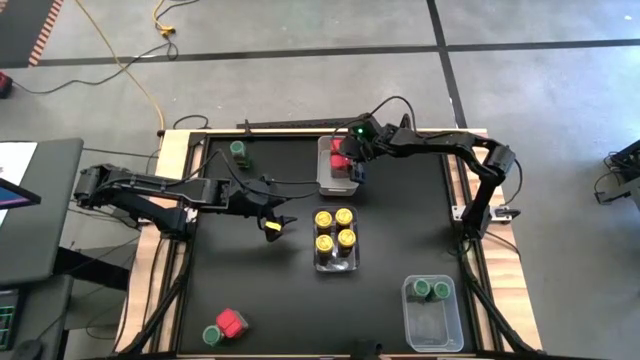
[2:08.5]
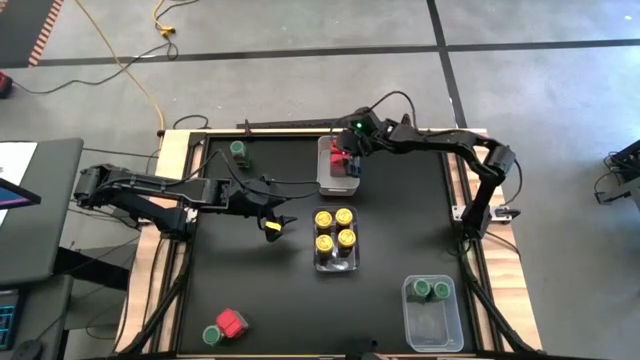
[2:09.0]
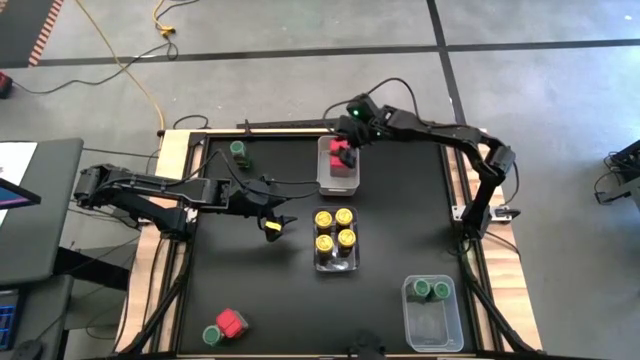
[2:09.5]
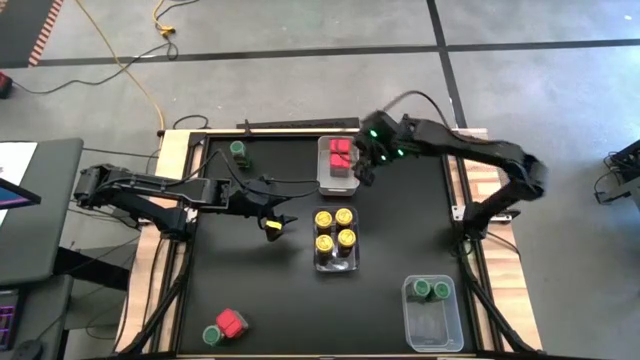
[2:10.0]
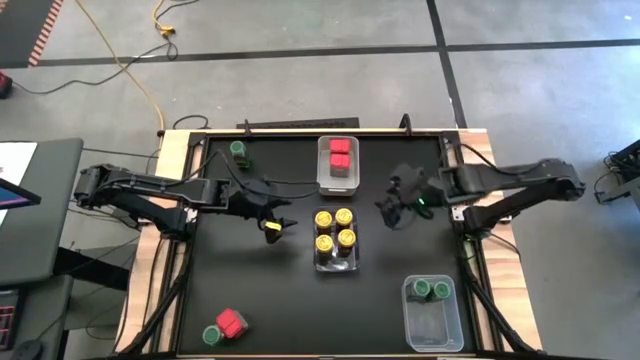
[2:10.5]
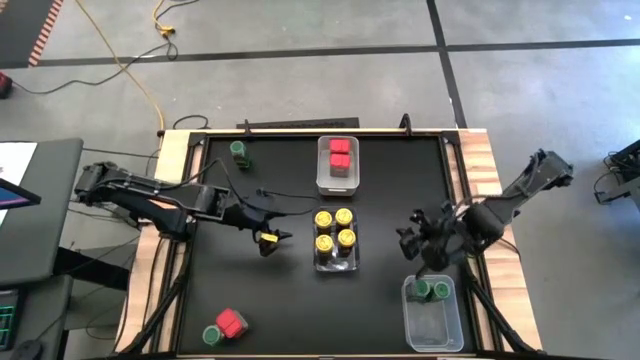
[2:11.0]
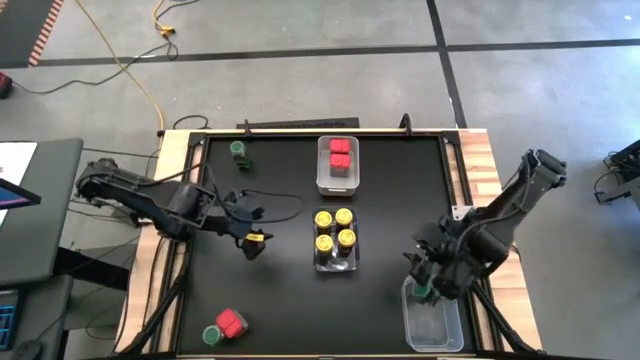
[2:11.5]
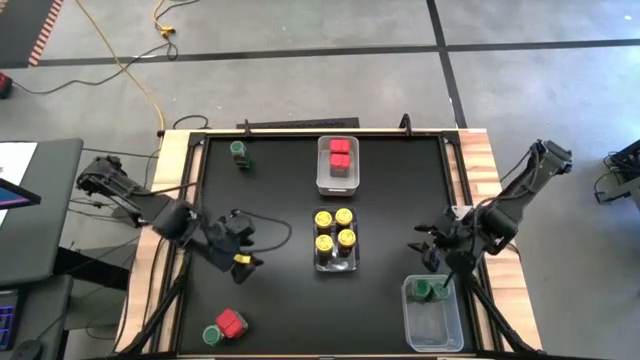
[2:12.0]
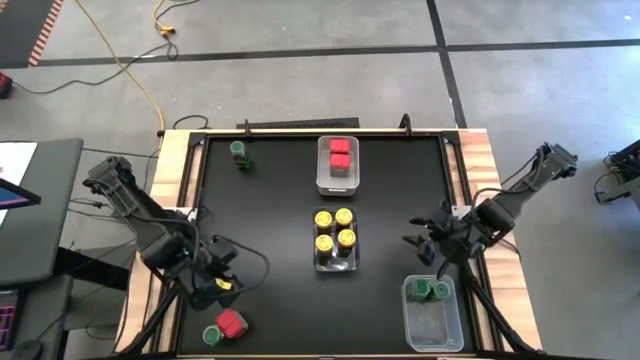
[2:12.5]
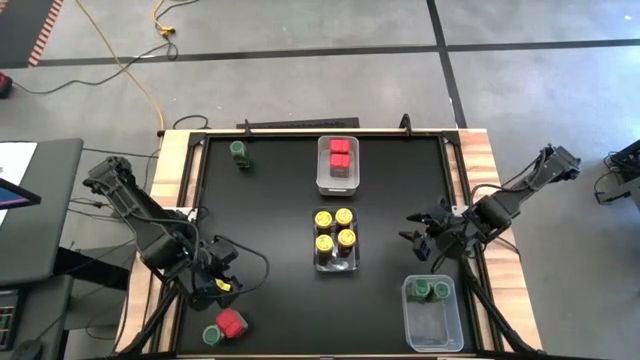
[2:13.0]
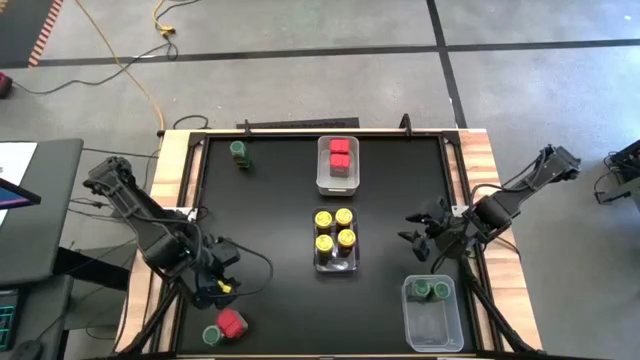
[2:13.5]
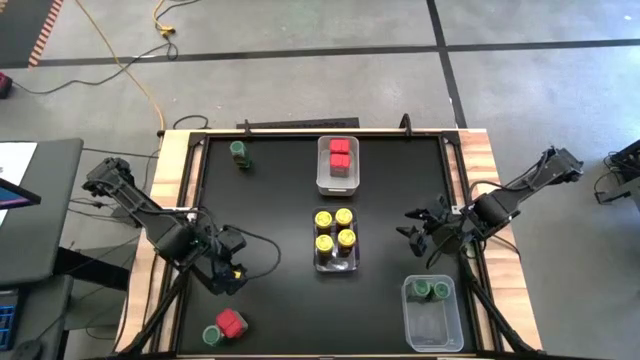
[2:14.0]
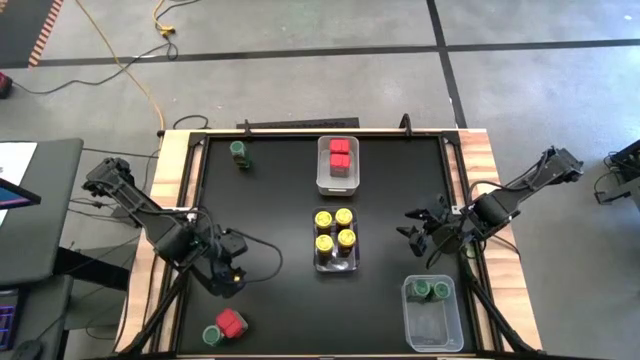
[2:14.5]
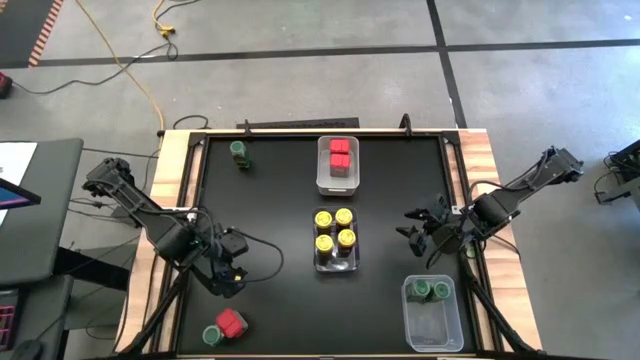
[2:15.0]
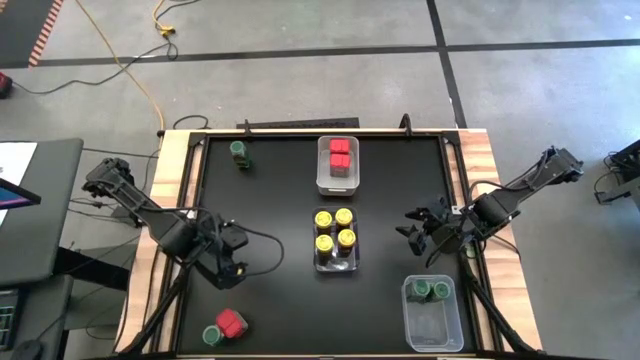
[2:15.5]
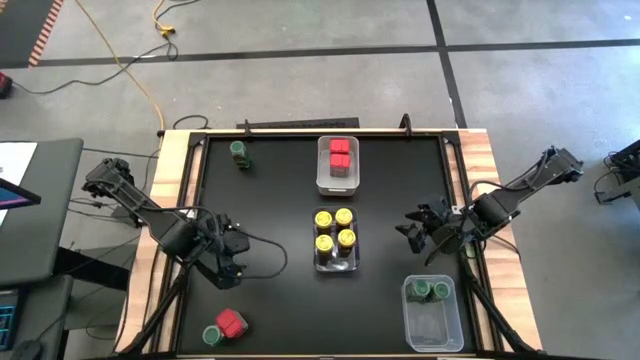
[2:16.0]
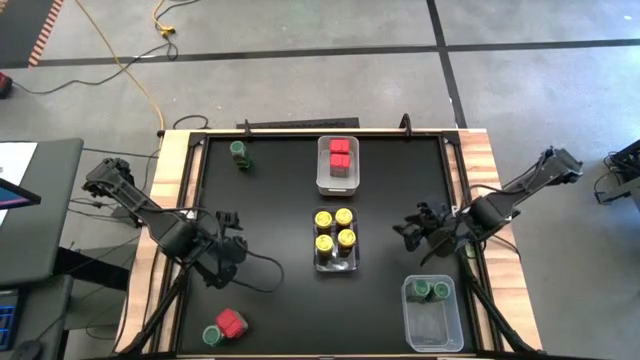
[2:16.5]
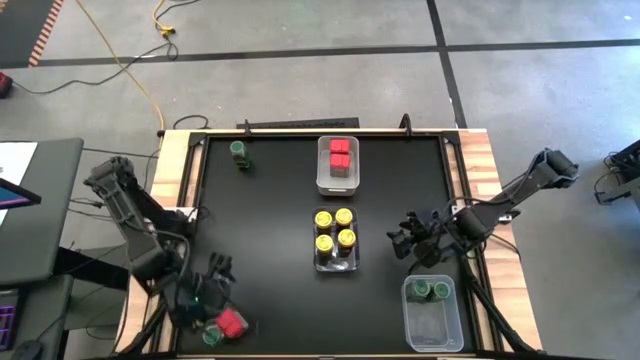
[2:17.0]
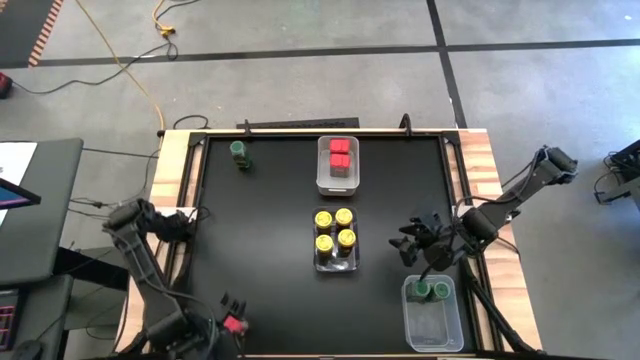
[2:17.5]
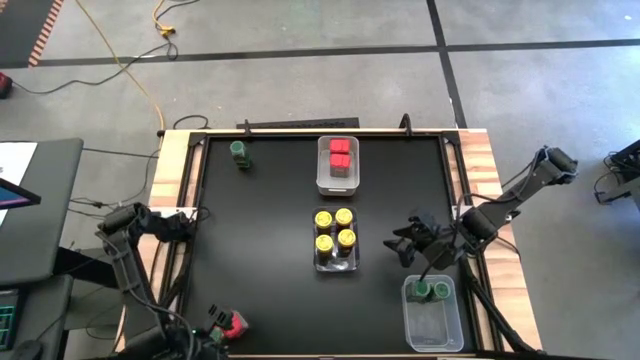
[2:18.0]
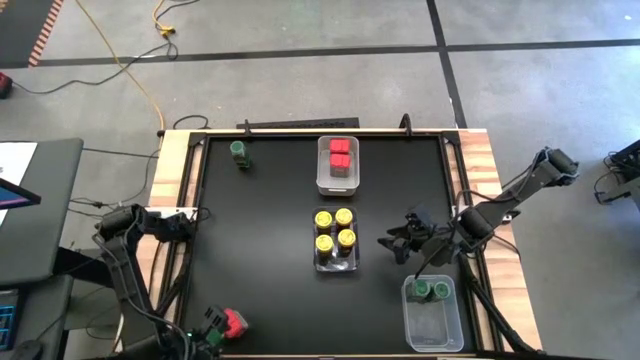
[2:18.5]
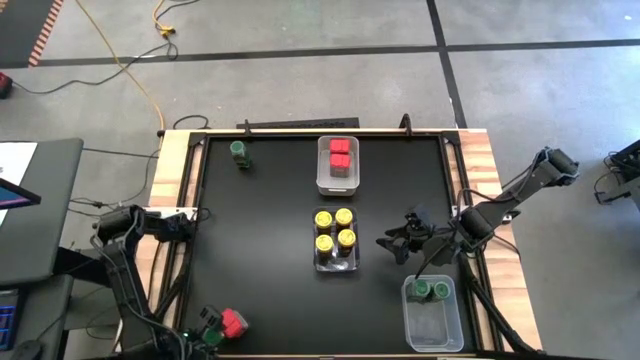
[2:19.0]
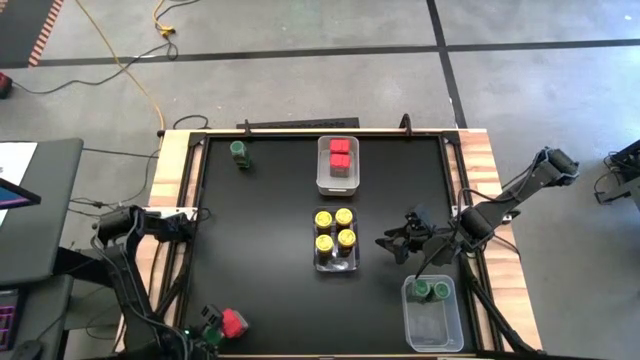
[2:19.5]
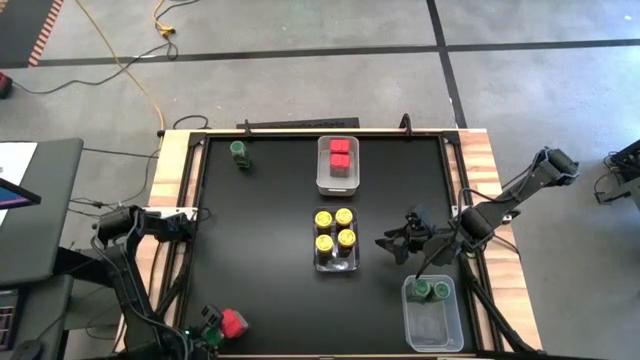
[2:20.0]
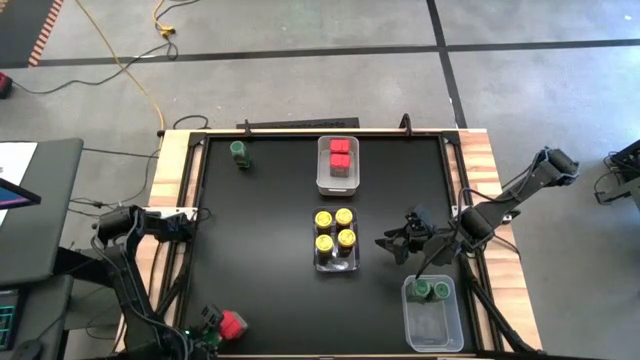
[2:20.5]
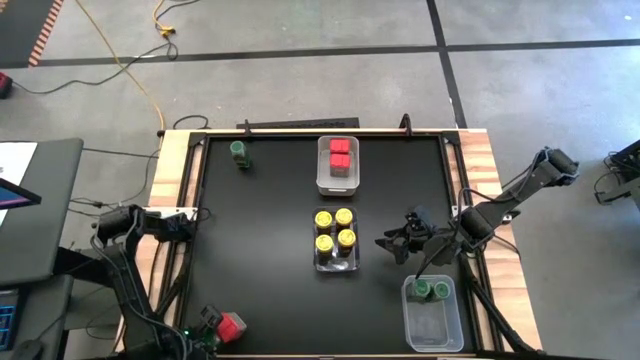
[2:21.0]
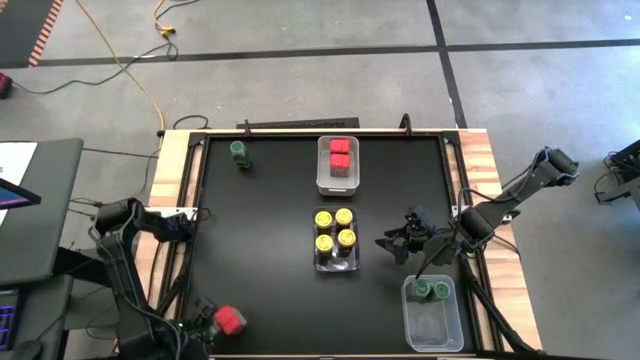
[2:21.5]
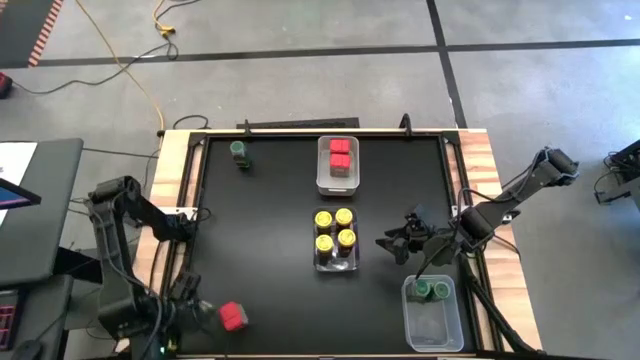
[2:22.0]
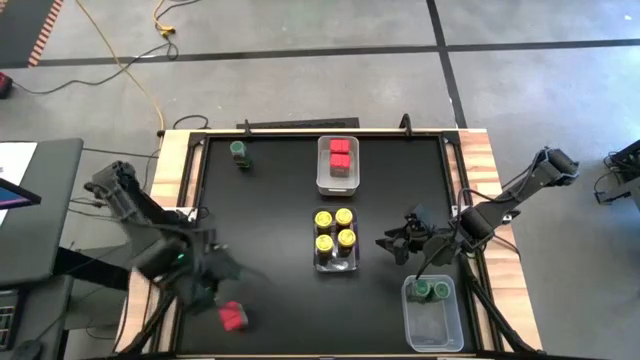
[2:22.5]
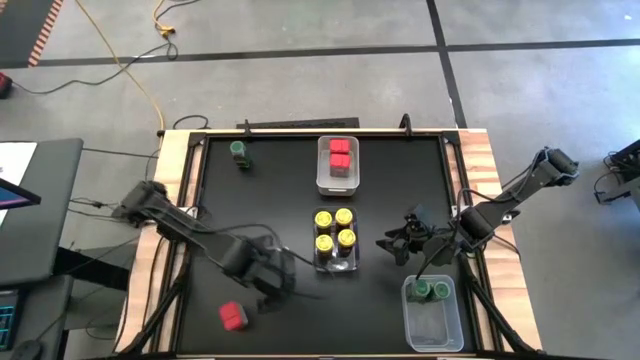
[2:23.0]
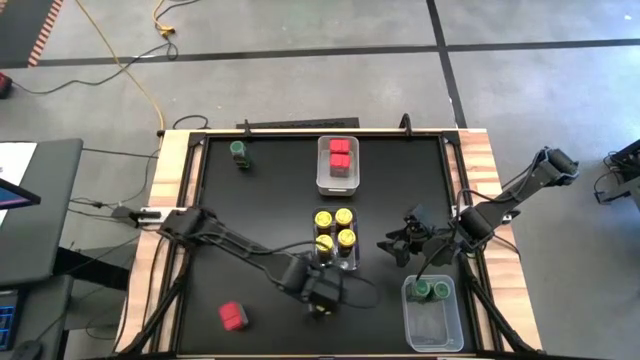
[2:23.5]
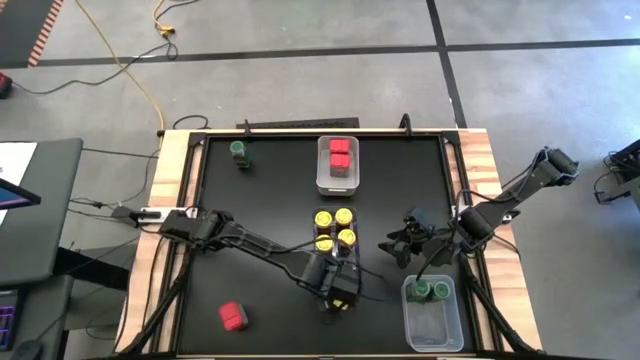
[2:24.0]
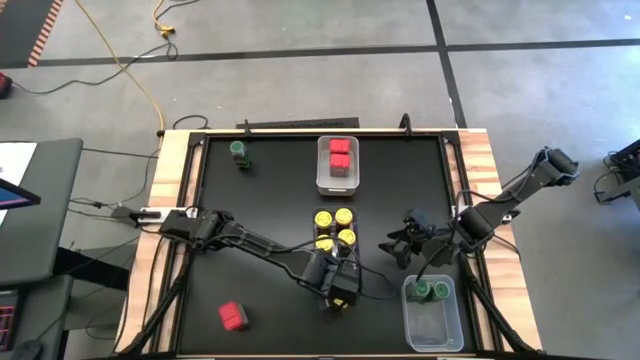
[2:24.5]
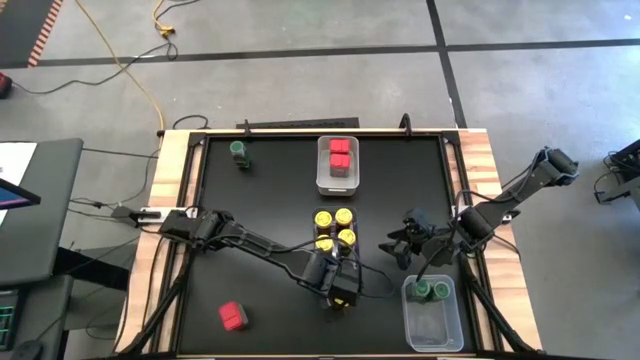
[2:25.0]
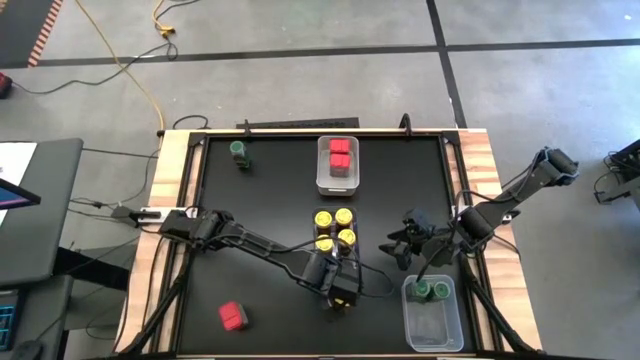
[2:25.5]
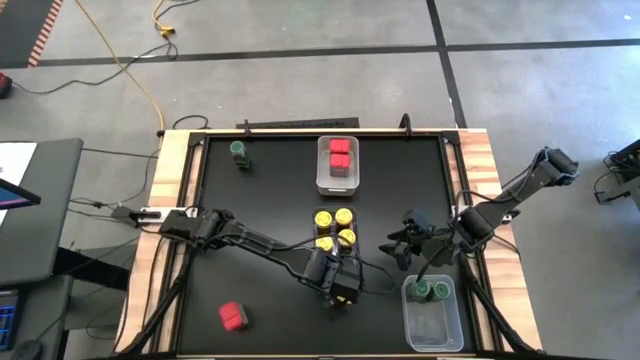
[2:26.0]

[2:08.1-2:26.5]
Task: Sort spices by type
Put the bottom green seasoning bottle into the transparent bin
